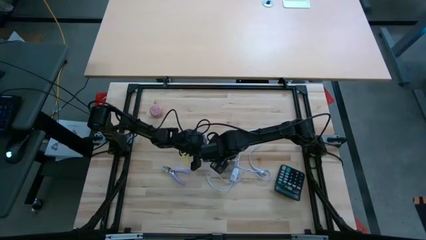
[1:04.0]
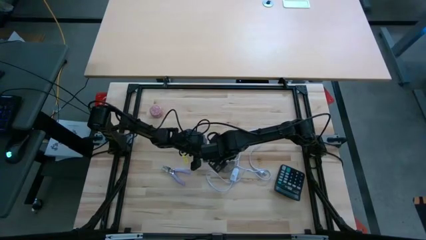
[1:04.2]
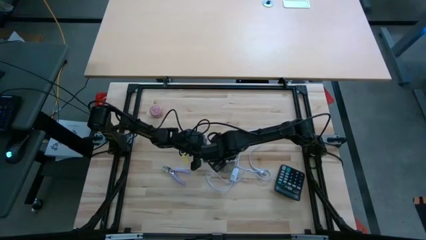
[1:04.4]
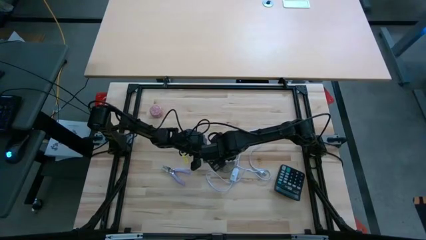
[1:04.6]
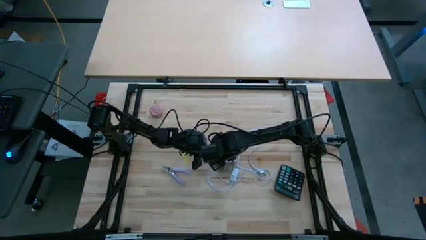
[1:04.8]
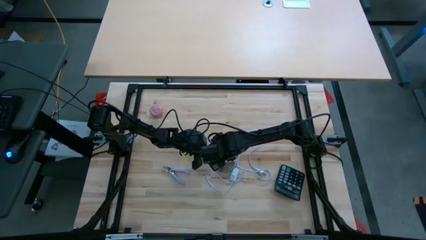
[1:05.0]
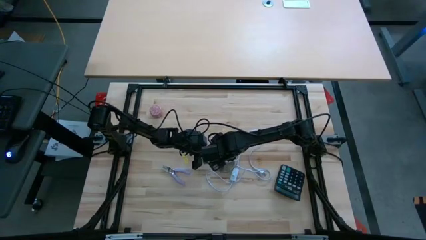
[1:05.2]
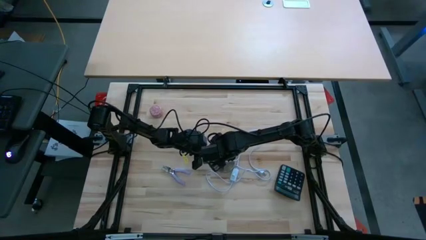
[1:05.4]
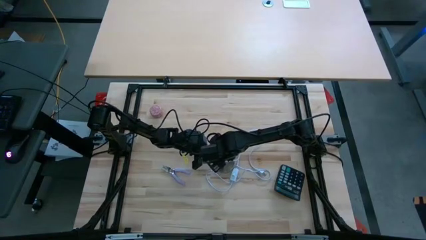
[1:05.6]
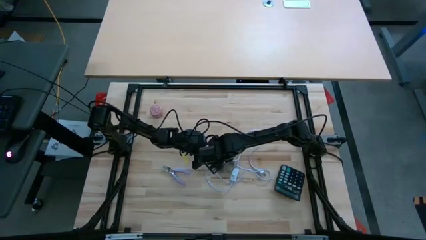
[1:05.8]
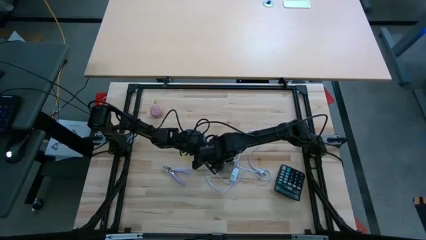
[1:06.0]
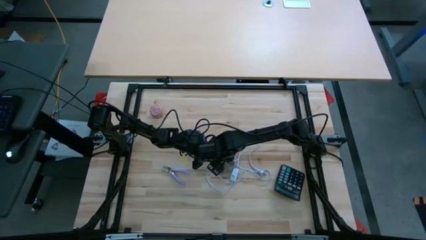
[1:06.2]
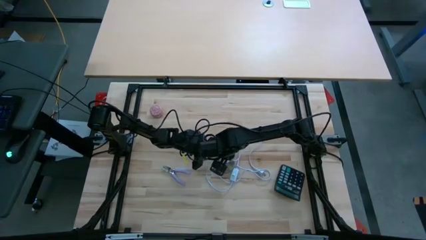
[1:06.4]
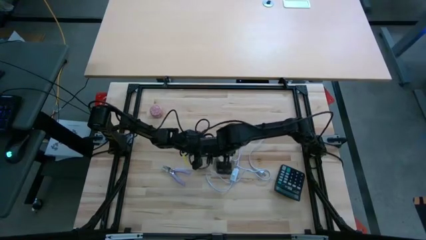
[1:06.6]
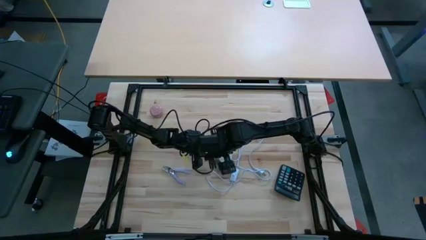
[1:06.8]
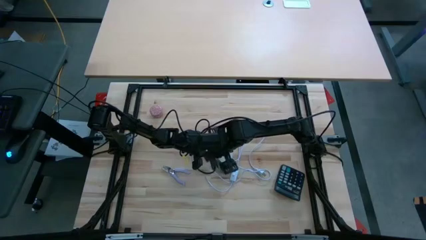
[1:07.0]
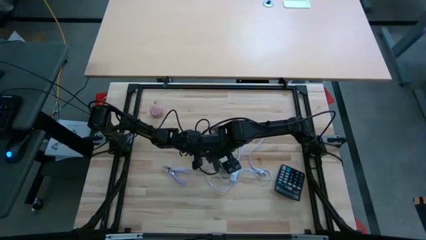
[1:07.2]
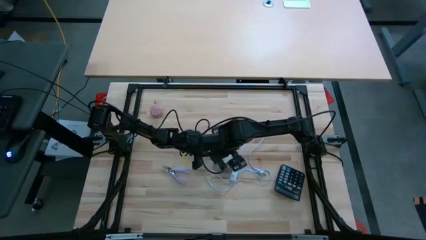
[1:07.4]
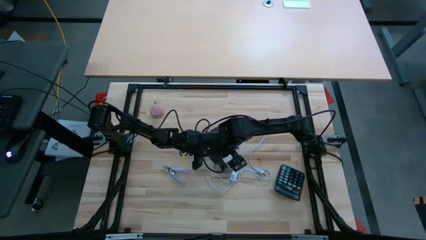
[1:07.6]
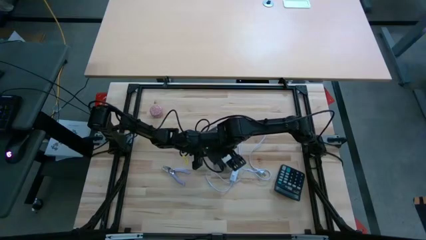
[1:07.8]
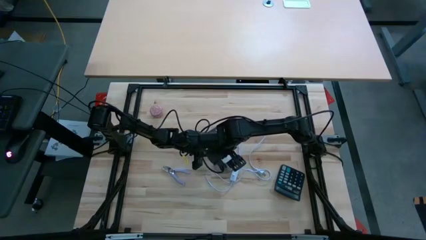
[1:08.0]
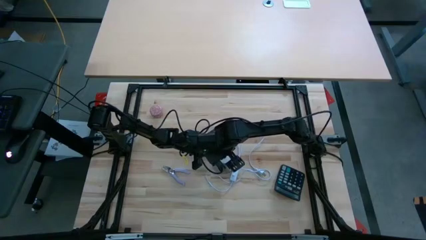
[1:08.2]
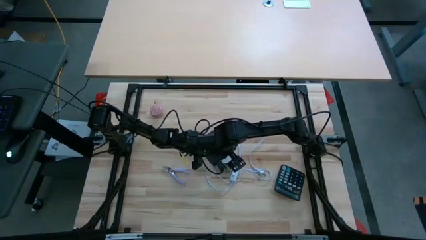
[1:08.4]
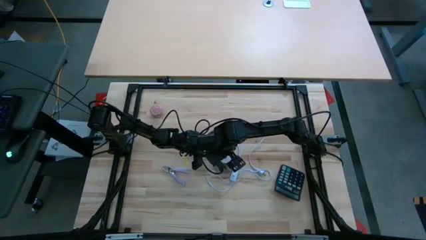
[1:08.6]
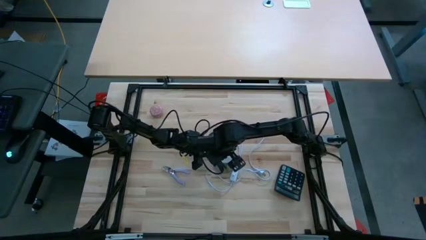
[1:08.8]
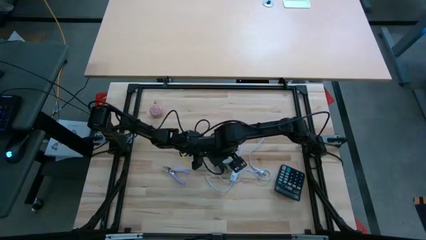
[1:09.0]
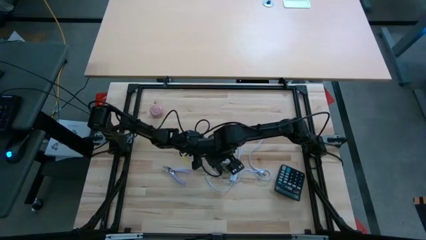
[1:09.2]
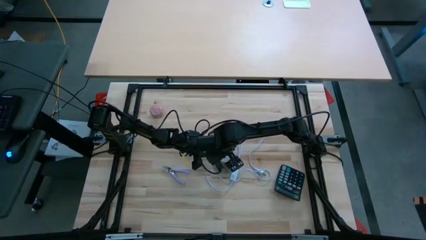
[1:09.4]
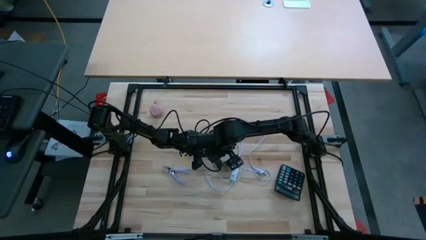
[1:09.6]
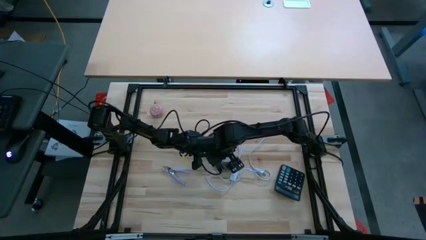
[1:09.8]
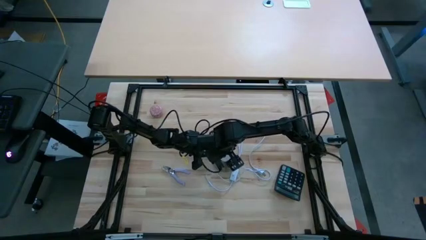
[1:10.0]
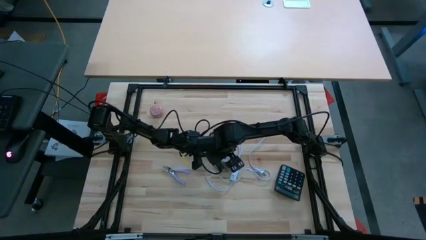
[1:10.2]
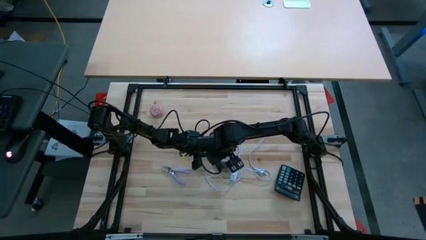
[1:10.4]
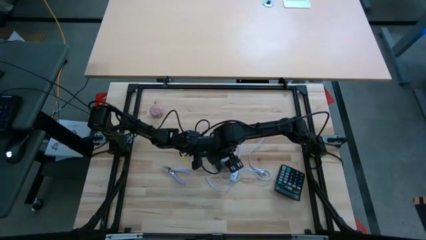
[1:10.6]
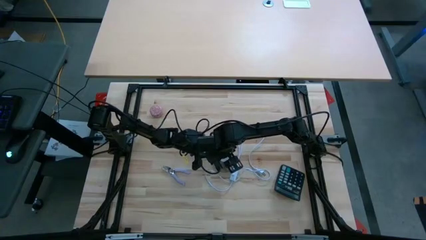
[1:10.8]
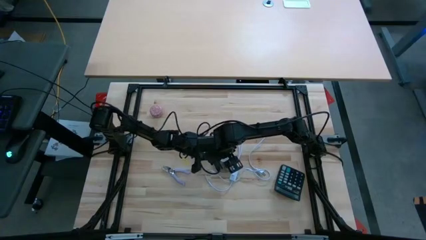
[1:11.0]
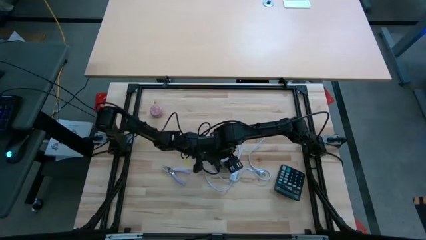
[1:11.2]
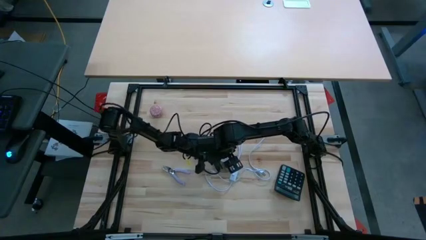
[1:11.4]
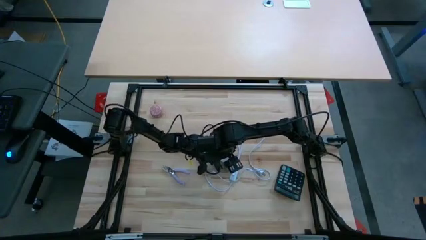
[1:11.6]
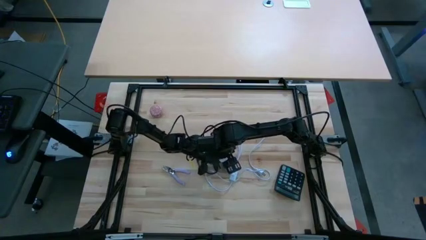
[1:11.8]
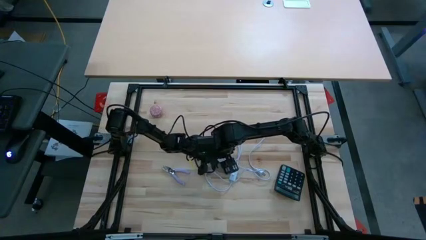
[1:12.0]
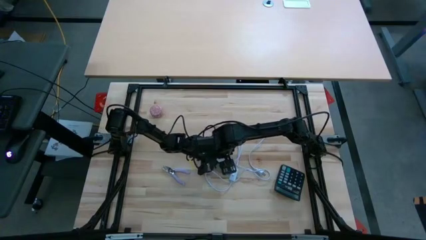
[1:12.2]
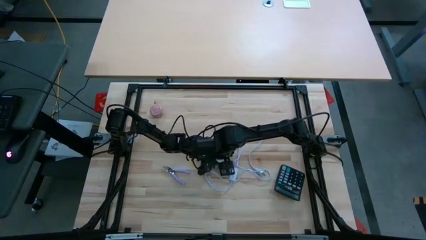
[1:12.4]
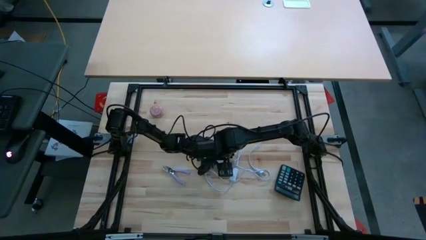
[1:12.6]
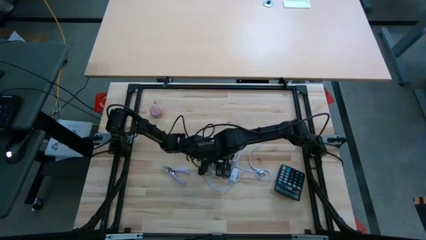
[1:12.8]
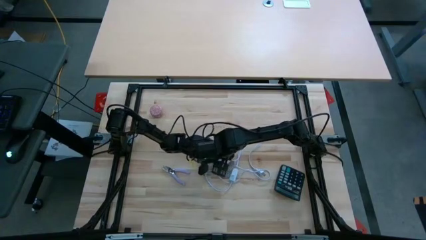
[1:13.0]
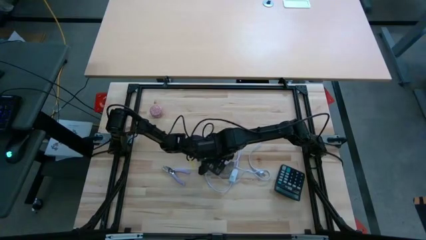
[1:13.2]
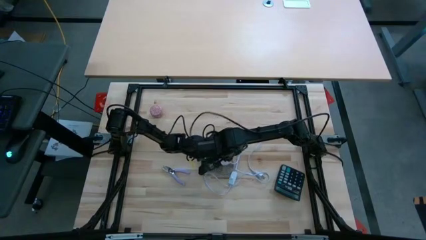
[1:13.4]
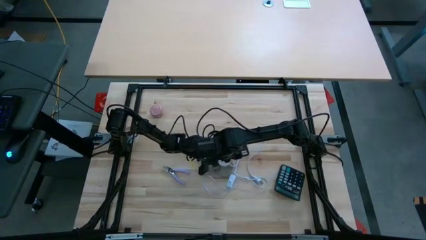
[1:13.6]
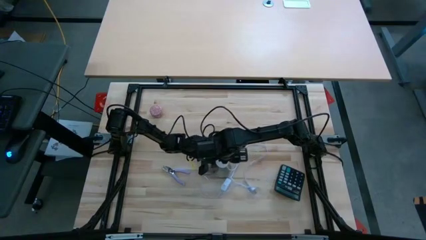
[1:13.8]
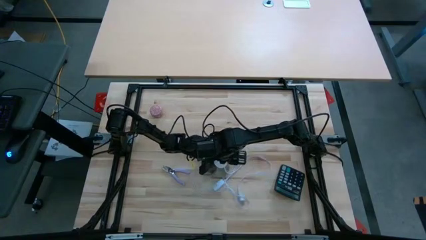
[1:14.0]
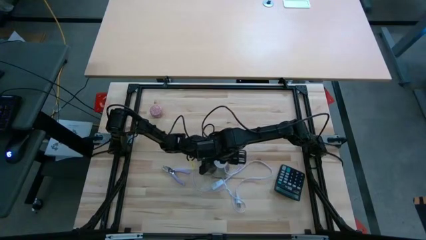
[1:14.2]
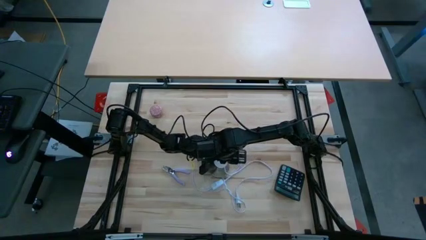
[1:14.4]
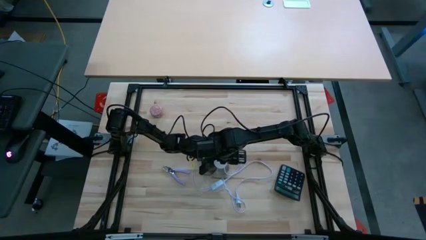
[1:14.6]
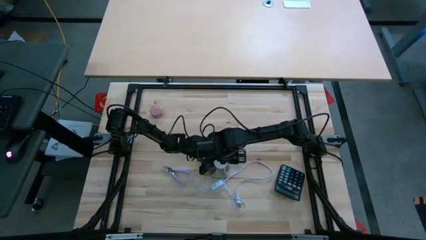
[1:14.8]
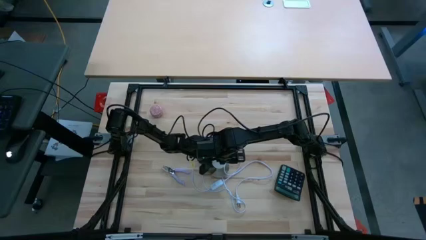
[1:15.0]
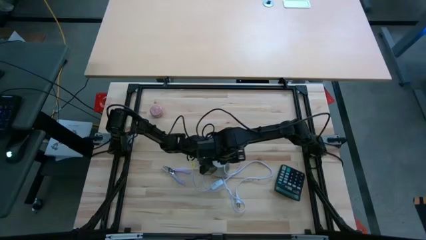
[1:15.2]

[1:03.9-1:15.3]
Task: Screw lightbulb
Insert the lightbulb into the lamp

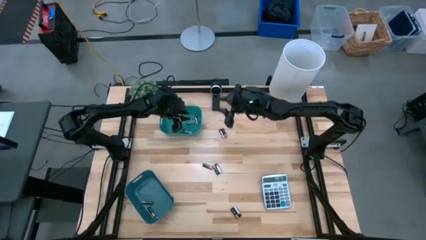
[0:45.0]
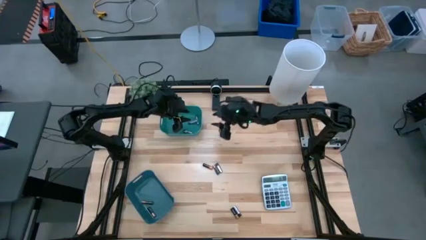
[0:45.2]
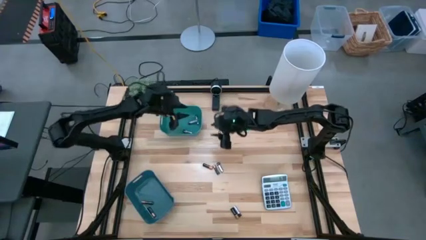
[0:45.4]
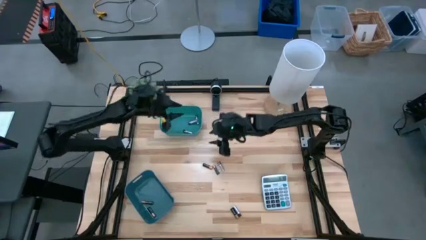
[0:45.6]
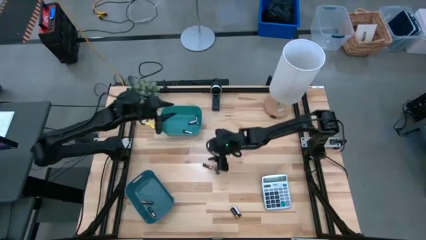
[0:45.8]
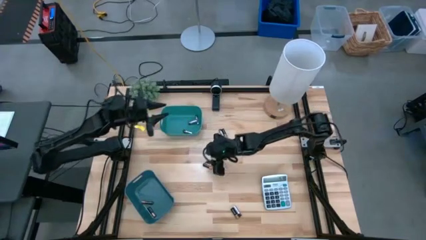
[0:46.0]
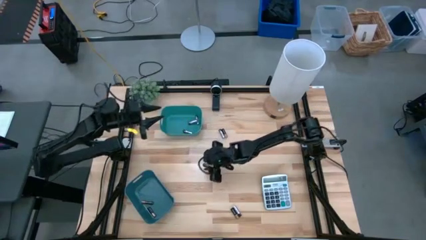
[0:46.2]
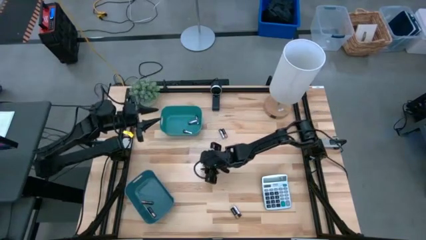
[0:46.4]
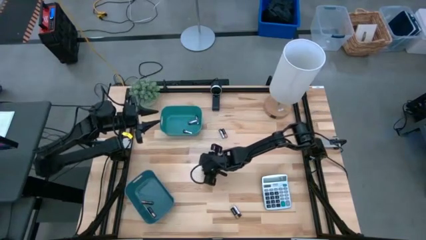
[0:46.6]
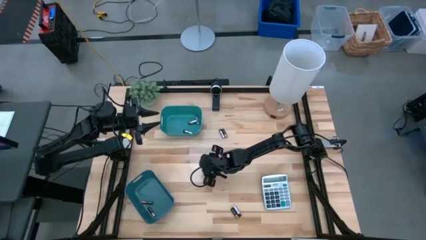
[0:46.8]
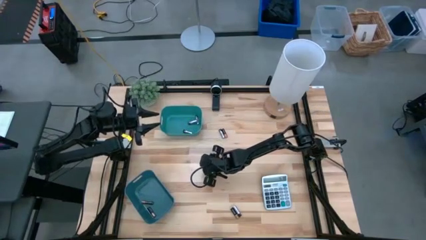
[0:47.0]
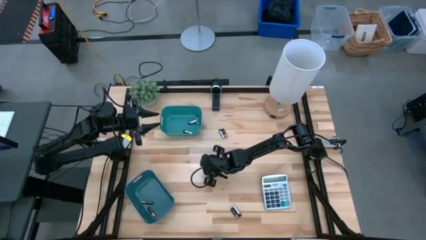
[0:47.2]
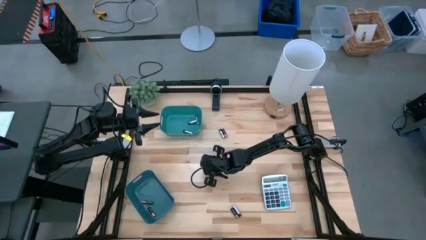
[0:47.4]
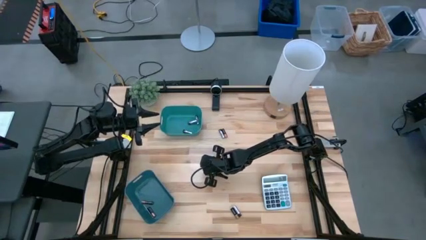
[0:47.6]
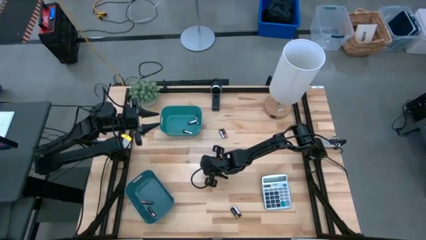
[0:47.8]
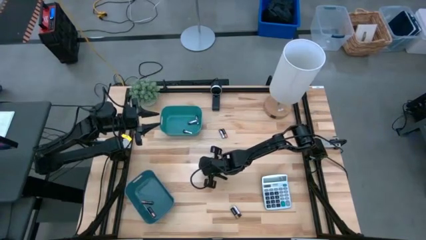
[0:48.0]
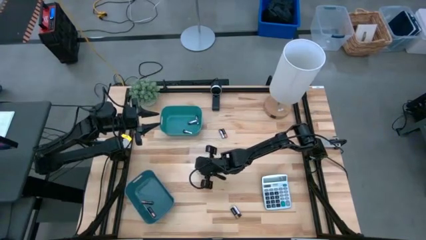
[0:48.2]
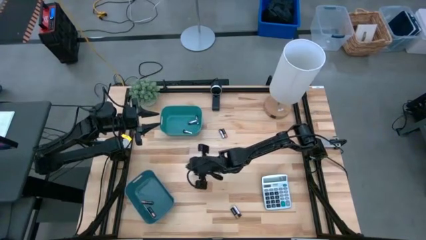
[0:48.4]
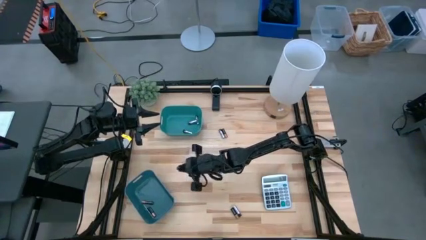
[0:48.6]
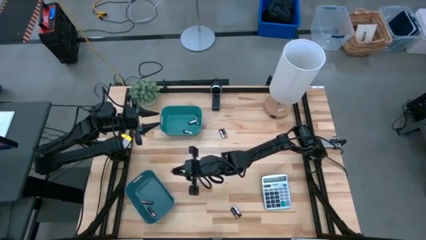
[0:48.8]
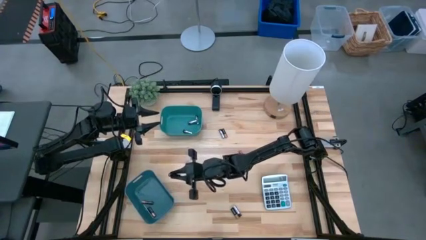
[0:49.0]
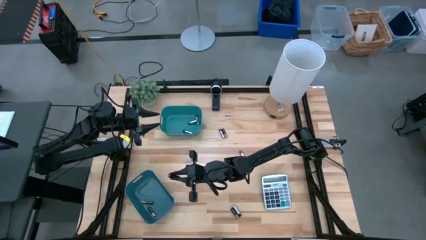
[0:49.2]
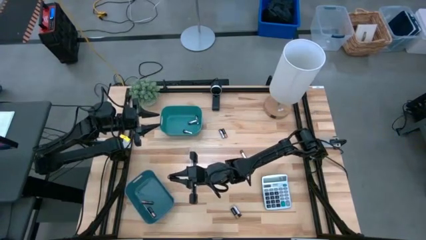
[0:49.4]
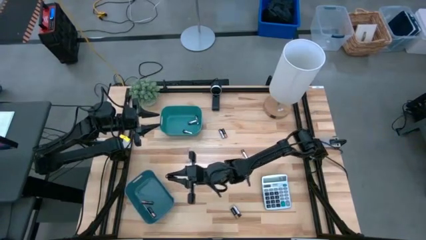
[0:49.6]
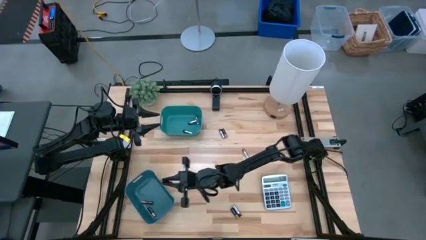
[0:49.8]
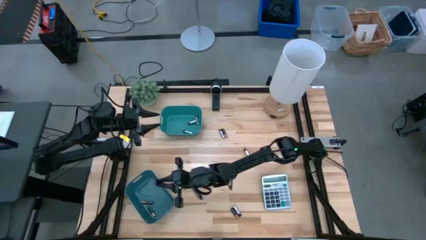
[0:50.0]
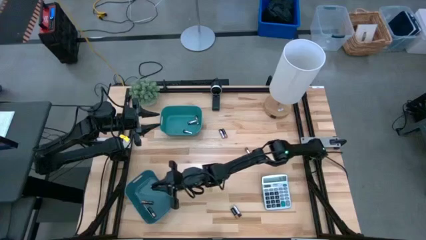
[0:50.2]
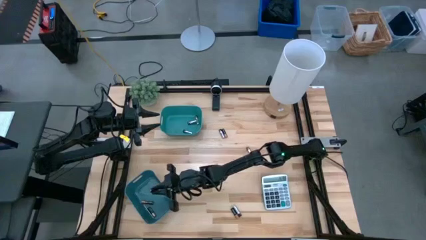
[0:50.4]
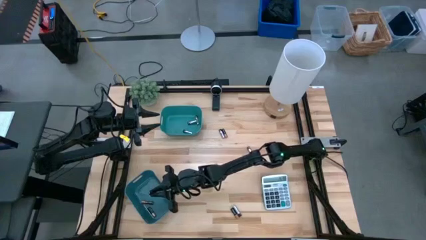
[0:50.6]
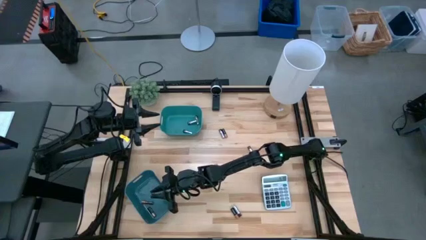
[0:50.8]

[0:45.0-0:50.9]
Task: Sort batteries
Put the black battery into the blue bin
